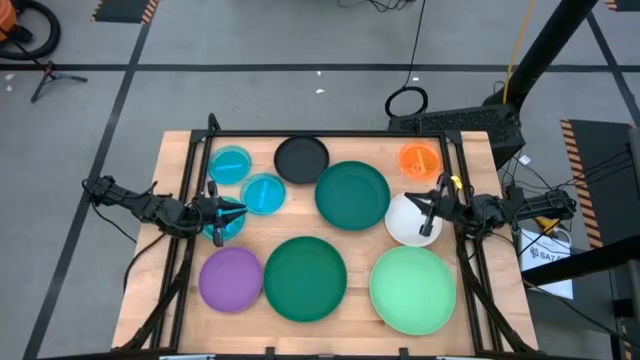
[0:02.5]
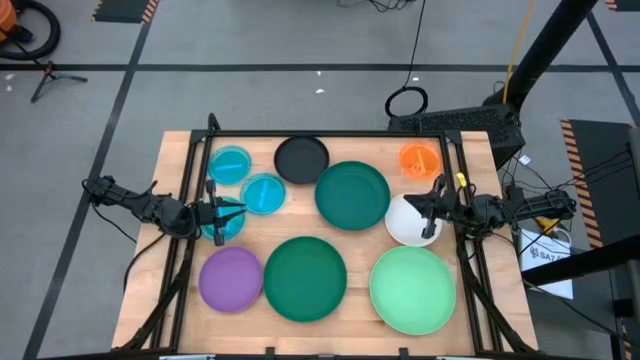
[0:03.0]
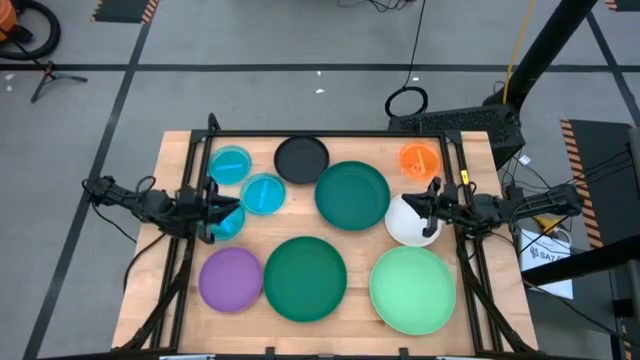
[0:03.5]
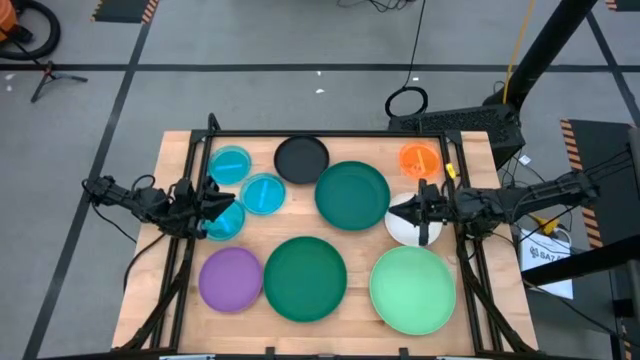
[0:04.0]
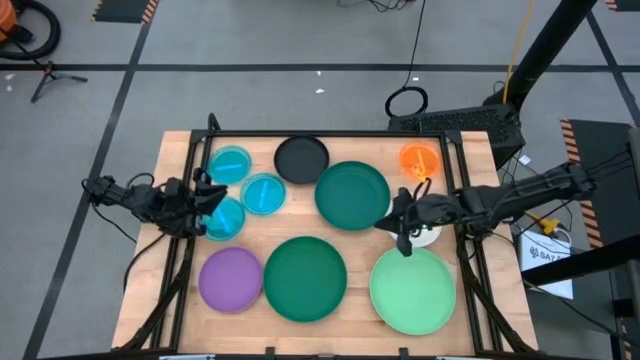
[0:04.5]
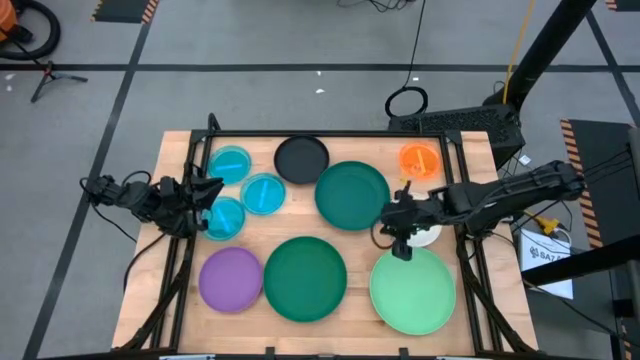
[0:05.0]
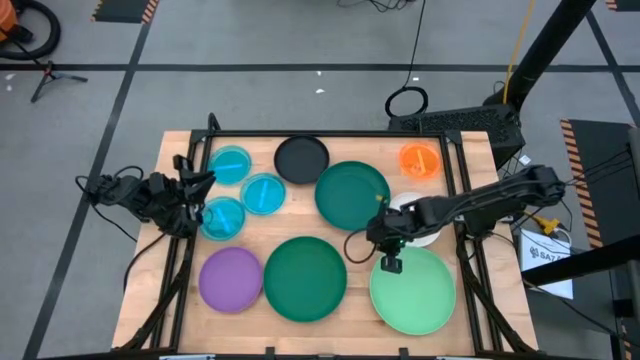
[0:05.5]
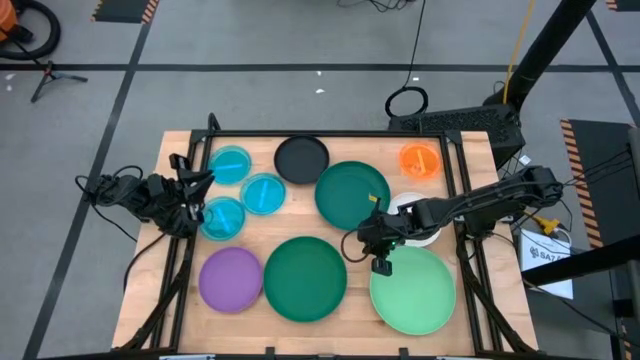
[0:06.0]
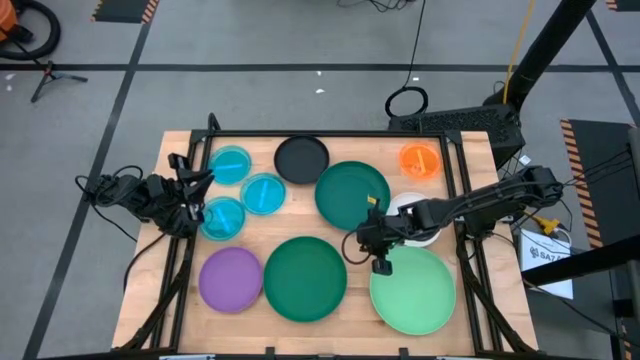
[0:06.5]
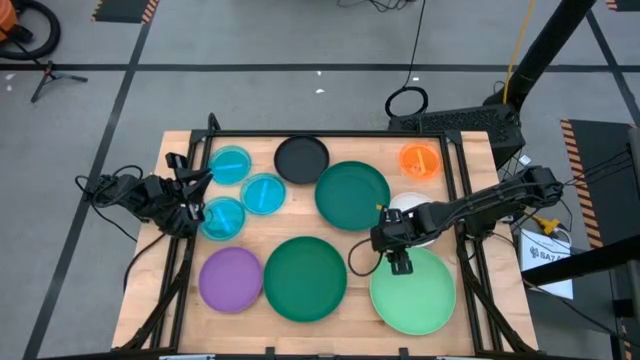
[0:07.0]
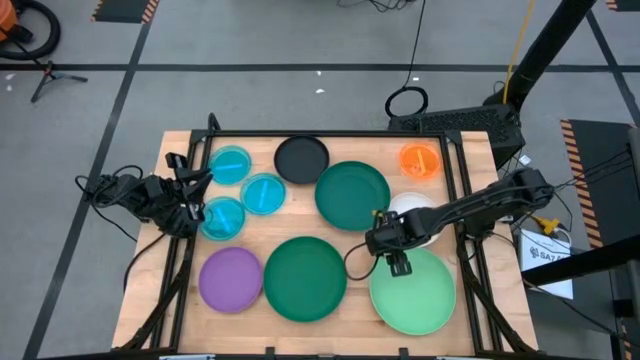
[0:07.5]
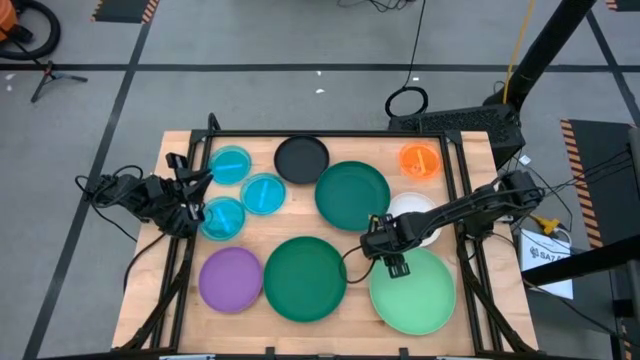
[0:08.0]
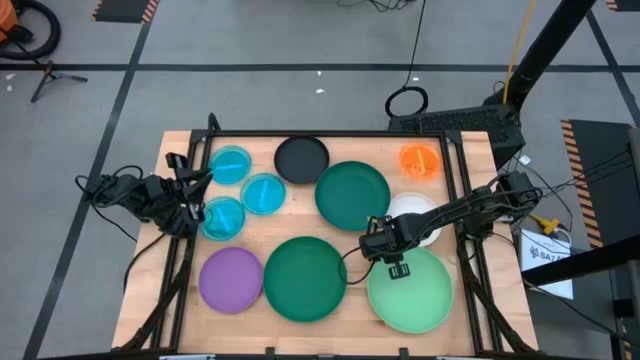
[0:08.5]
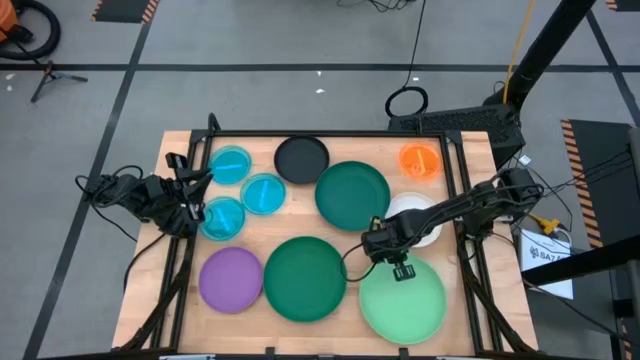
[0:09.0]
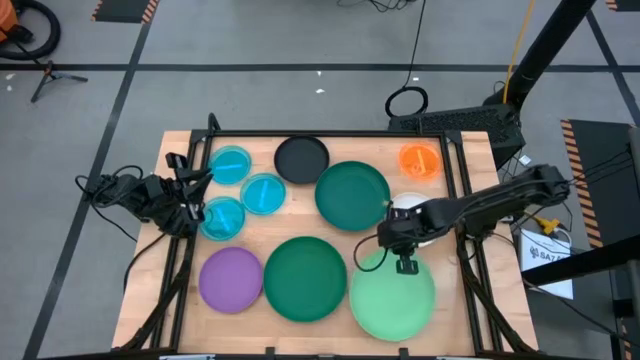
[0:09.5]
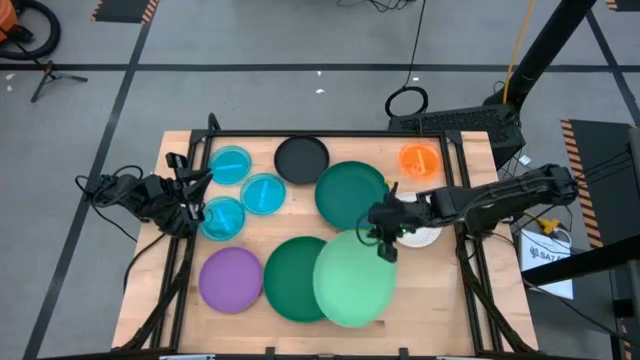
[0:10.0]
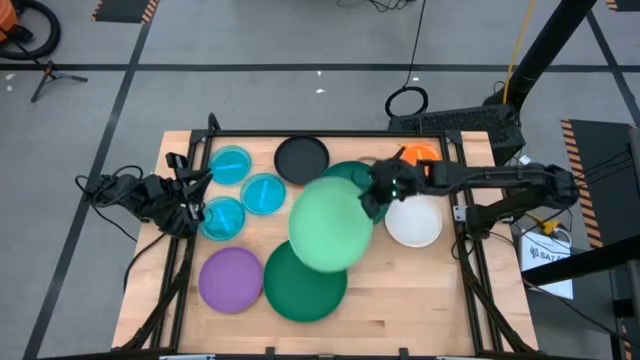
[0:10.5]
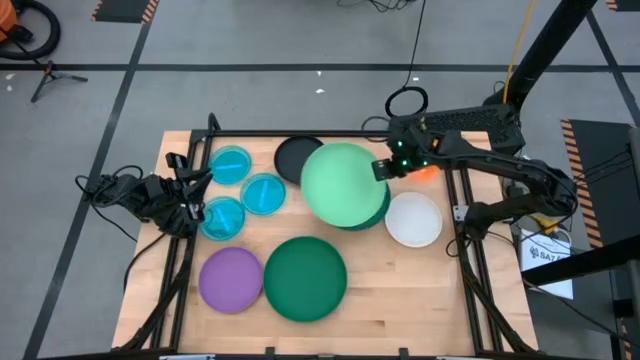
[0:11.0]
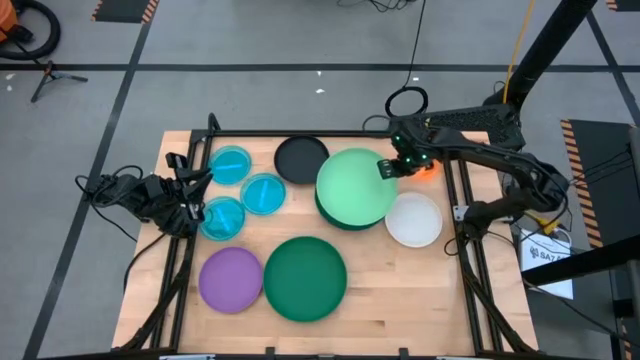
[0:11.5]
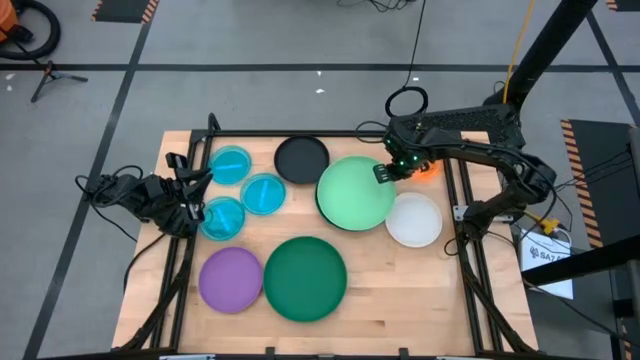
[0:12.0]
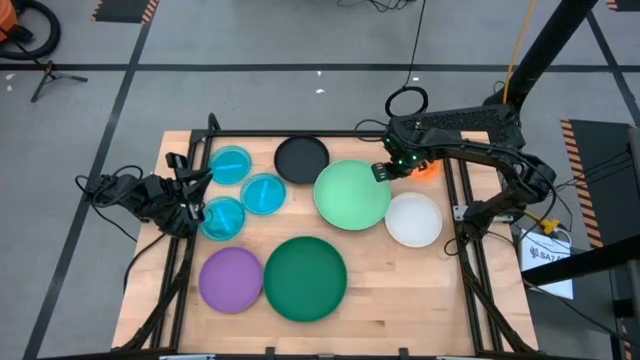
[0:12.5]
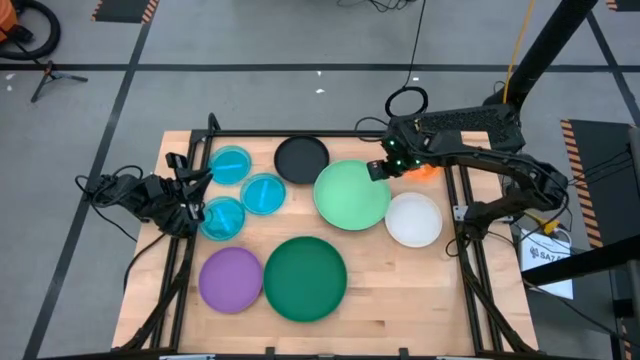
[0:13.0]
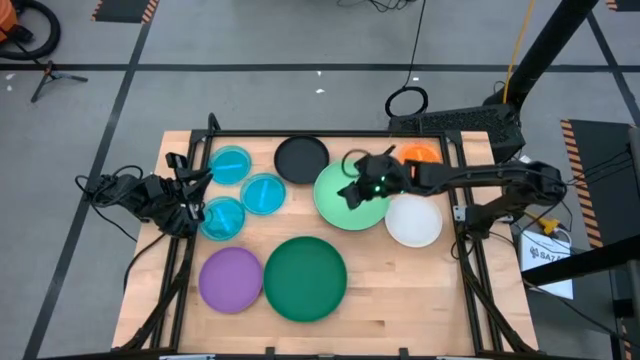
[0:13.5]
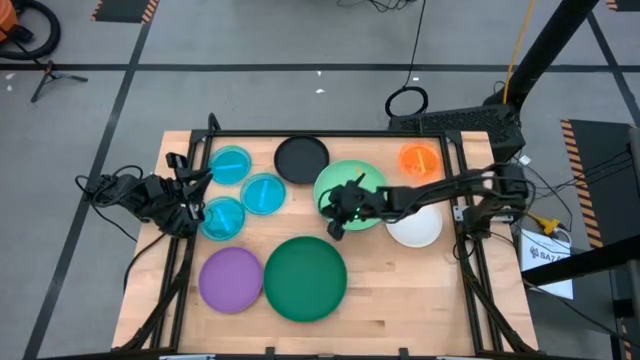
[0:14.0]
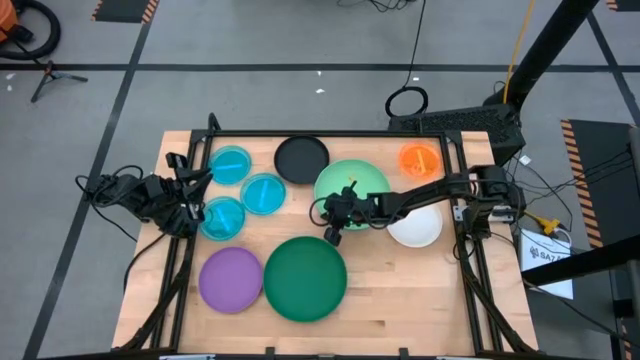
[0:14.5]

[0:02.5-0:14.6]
Task: Stack plastic plates
Stack the light green plate on the dark green plate

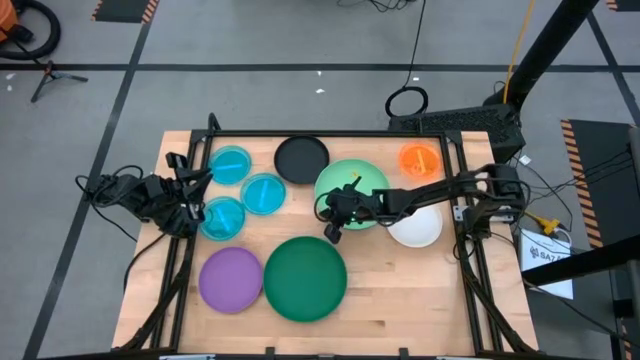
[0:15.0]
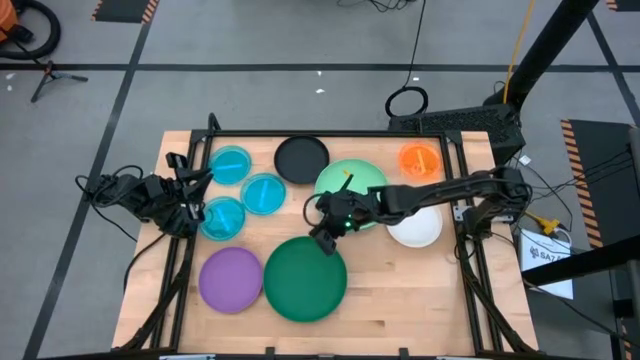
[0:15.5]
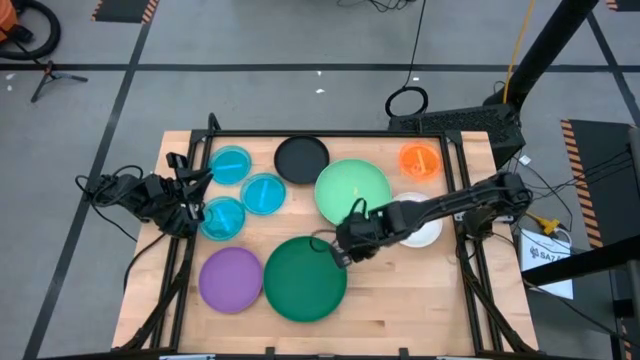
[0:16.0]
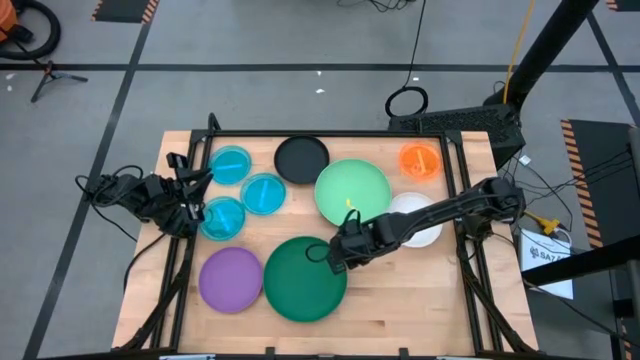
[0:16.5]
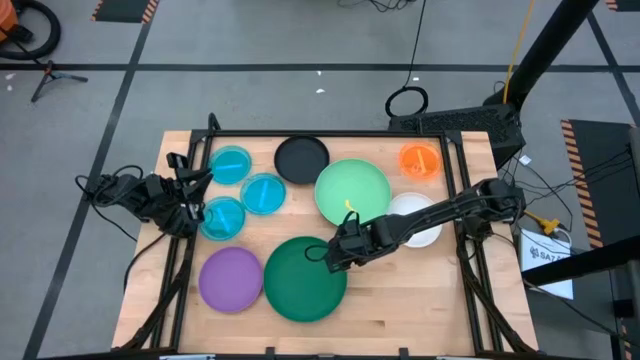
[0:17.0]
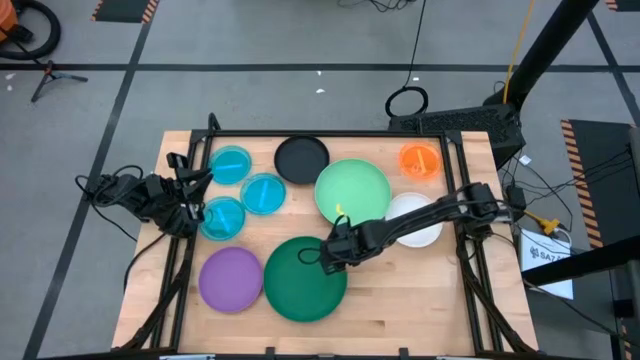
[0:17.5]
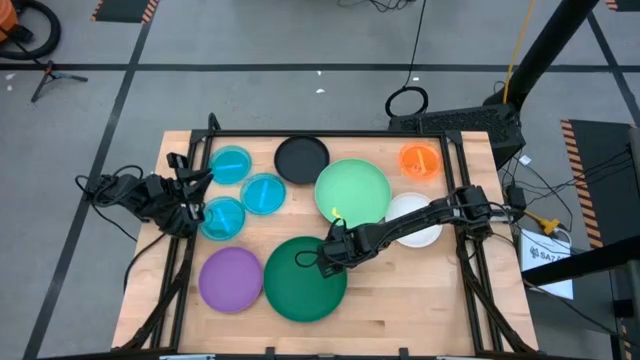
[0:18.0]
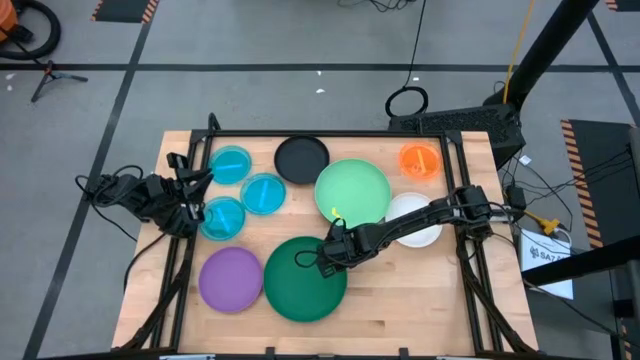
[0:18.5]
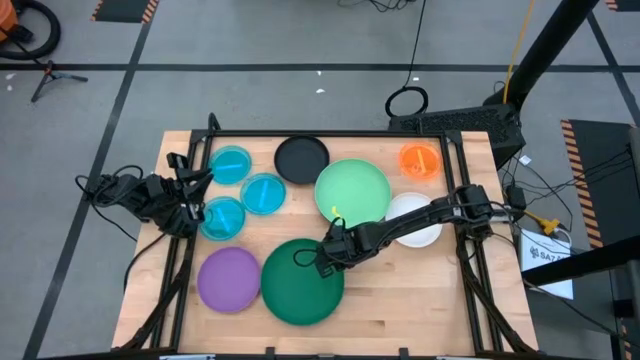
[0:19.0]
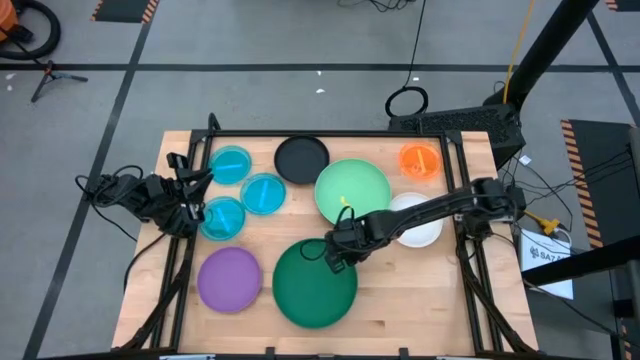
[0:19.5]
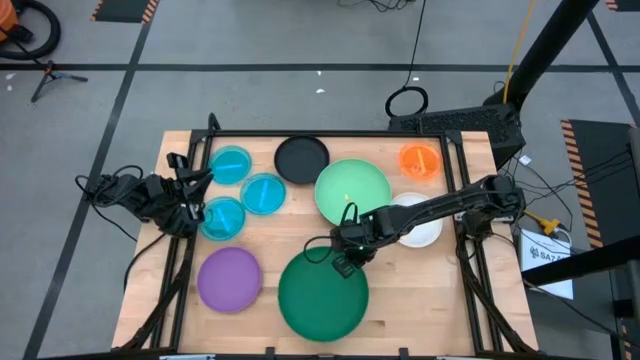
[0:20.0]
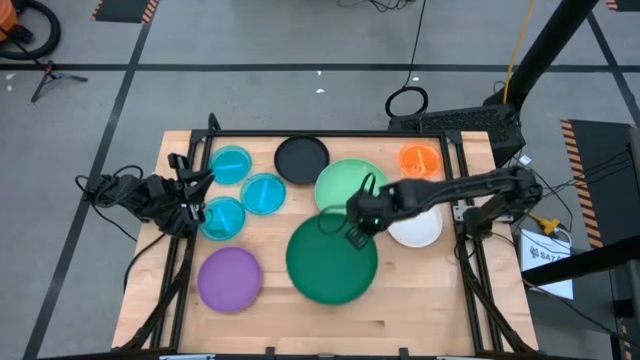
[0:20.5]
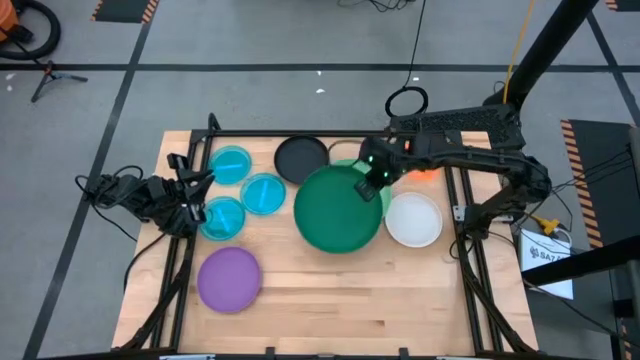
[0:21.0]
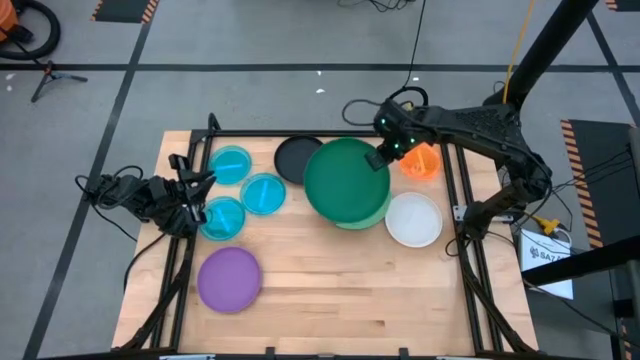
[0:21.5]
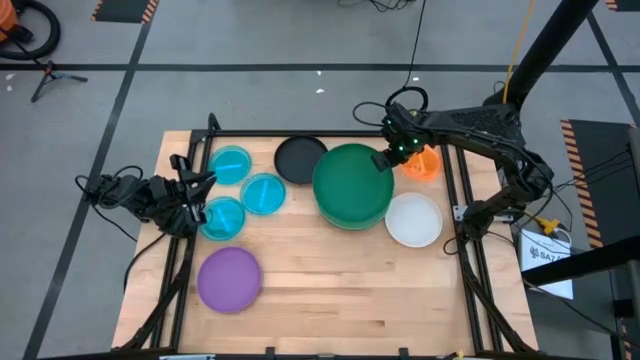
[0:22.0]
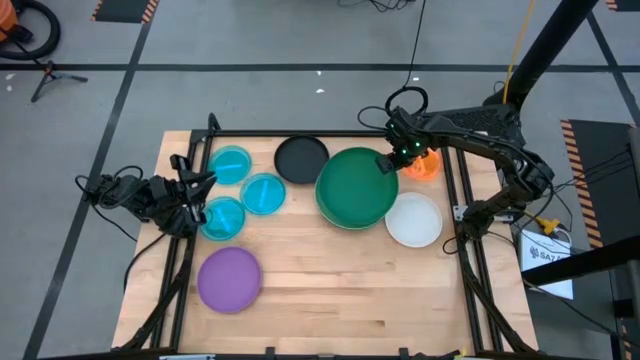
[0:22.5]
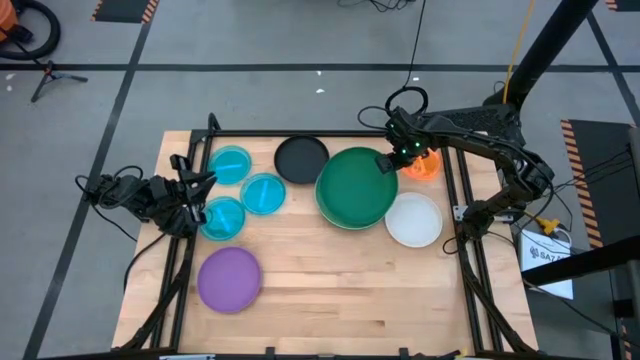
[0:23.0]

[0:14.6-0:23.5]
Stack the green plate on the light green plate
